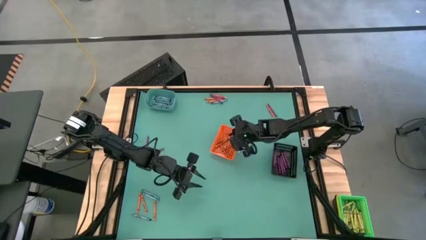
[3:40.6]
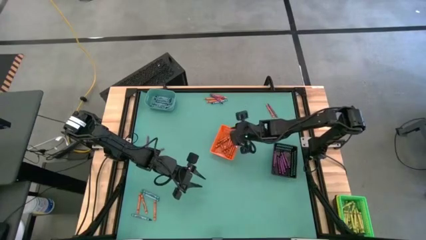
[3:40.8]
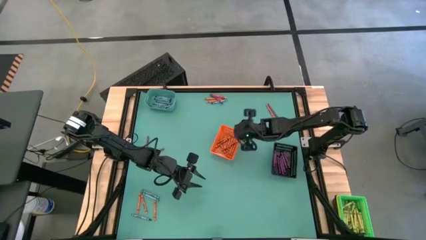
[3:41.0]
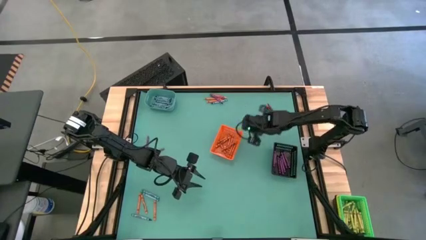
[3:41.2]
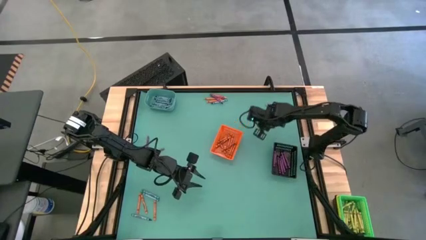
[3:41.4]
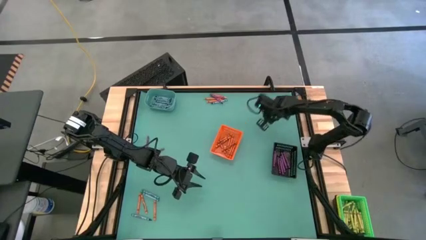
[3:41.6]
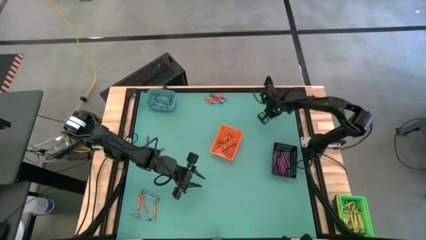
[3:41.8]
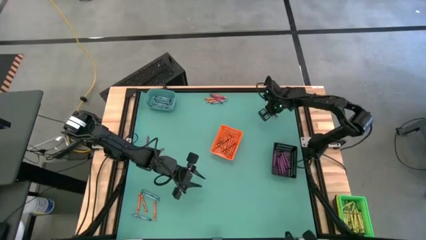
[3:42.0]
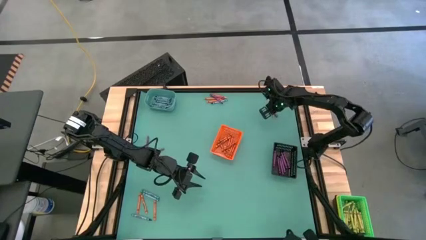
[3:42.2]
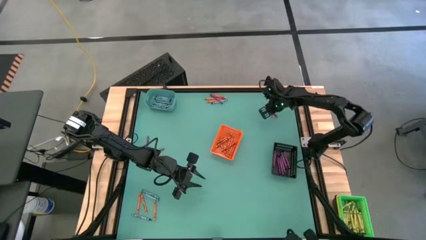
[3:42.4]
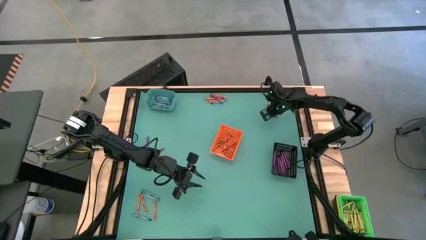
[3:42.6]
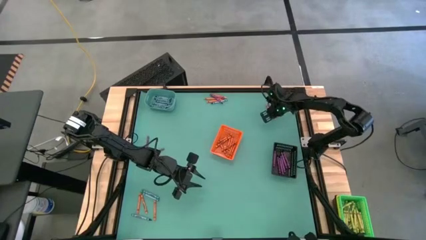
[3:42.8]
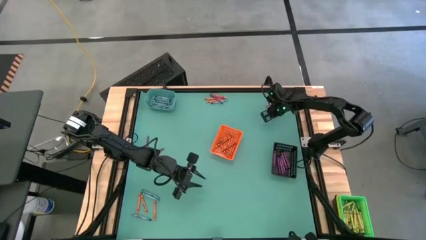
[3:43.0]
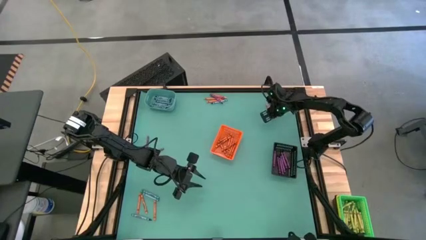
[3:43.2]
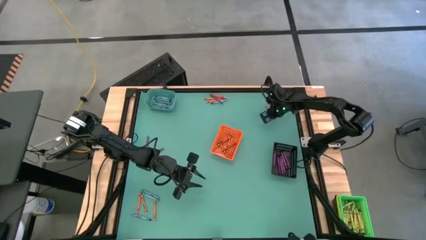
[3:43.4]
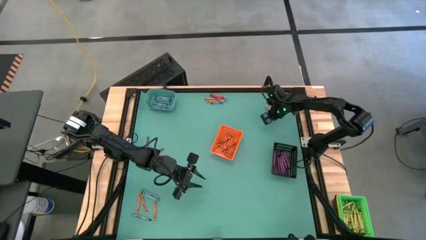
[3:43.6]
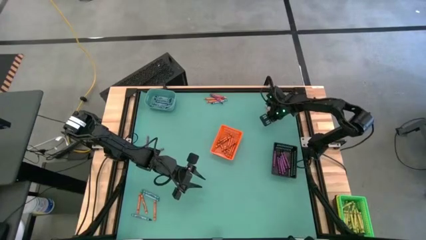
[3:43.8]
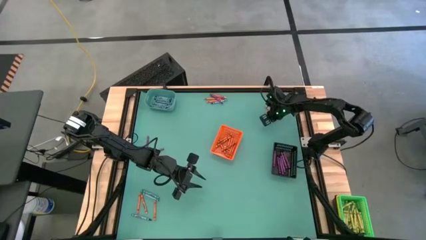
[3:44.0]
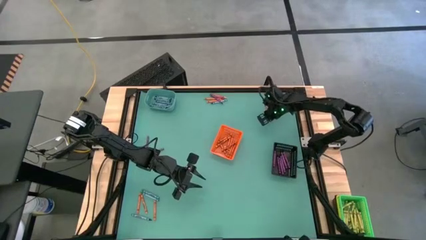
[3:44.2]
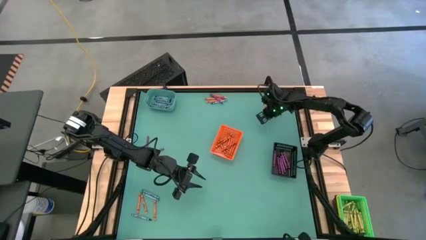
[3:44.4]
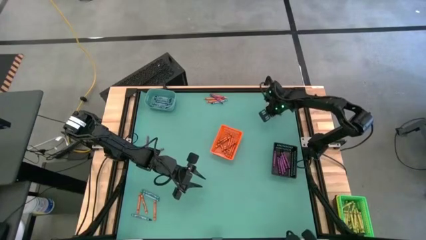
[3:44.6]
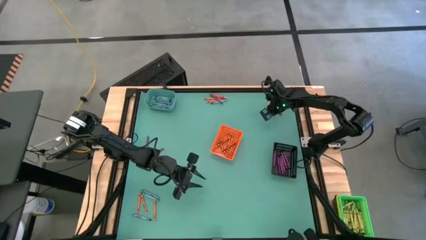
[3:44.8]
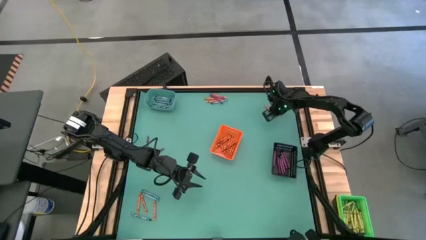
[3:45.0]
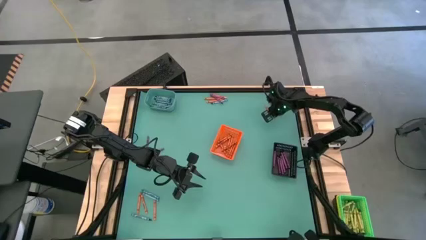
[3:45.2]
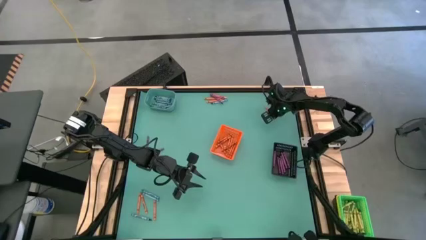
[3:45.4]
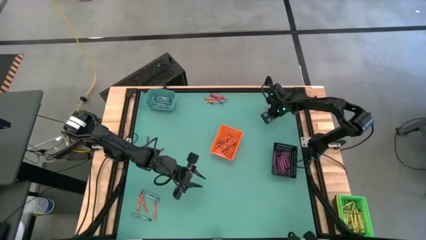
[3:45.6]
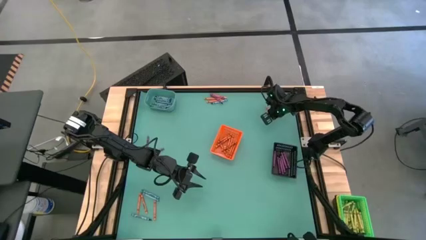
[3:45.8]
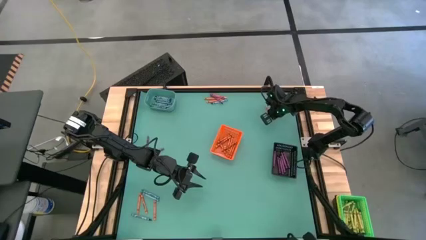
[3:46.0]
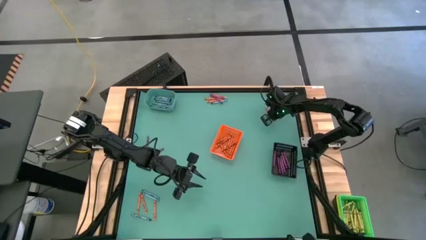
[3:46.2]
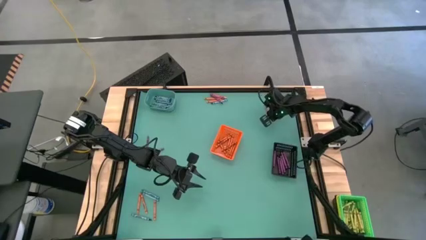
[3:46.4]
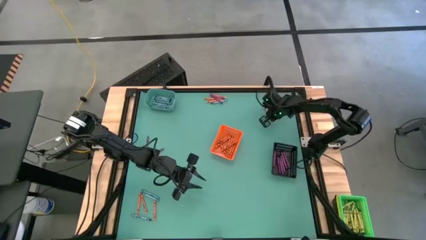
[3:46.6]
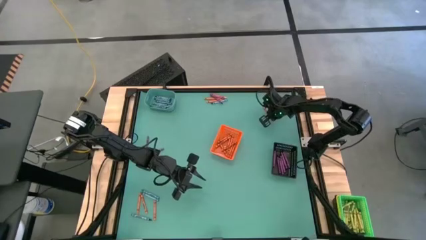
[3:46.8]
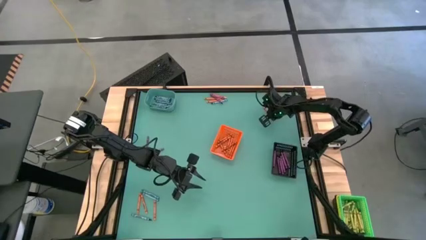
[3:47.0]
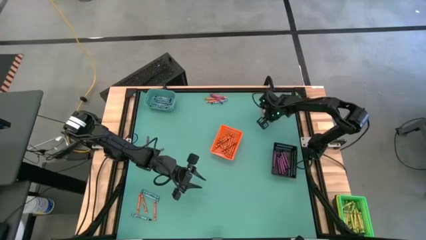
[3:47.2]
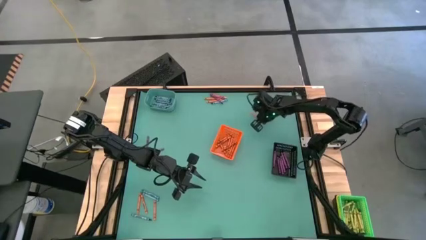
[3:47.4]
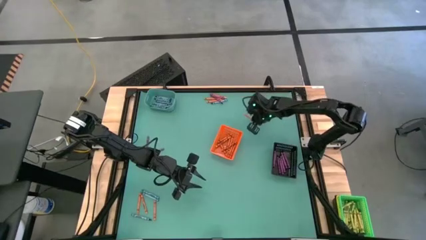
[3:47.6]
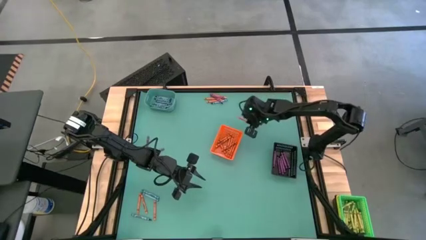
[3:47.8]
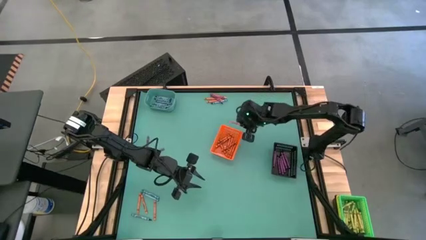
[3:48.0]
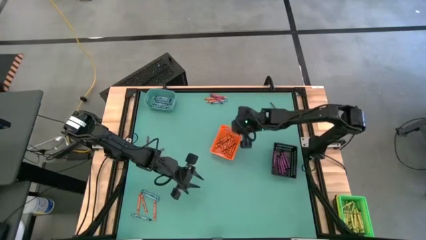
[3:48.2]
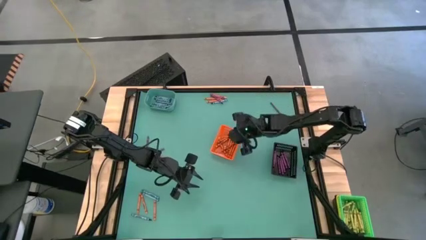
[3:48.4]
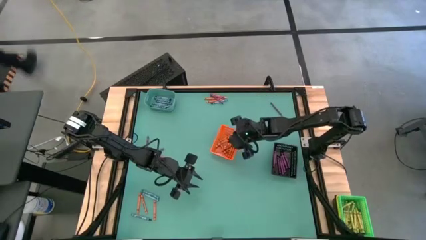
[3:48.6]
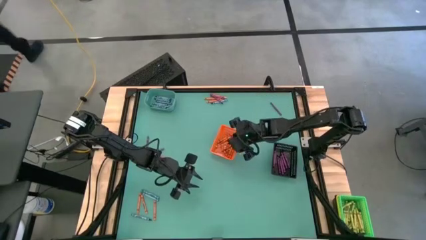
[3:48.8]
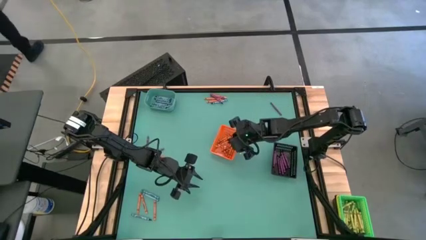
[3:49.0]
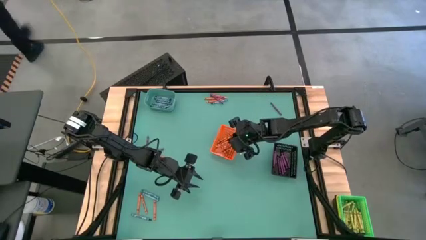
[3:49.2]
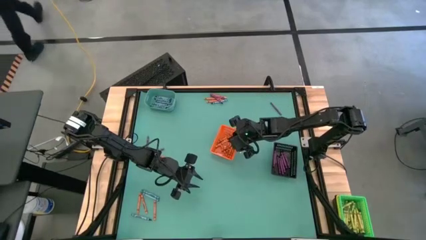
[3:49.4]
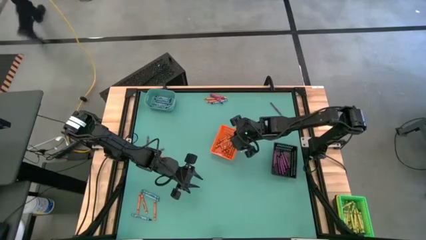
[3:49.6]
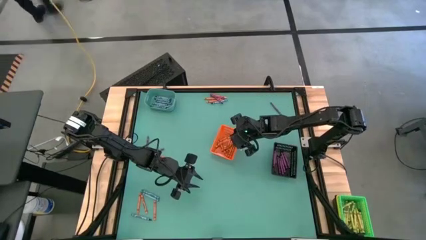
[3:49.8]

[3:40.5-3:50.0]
Task: Sort crayons
Put the orange crayon into the orange bin

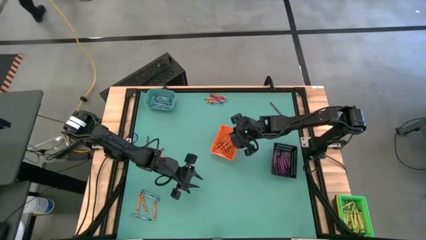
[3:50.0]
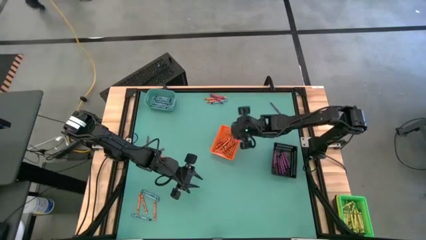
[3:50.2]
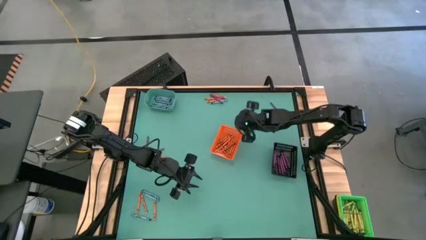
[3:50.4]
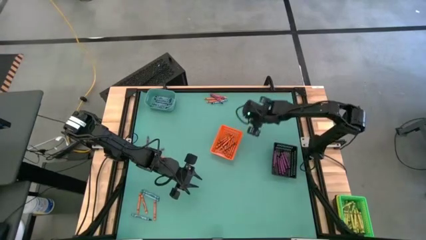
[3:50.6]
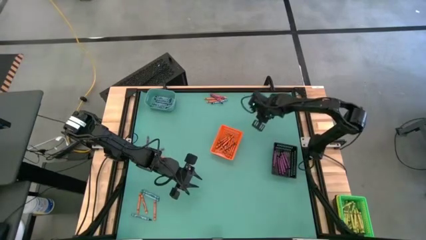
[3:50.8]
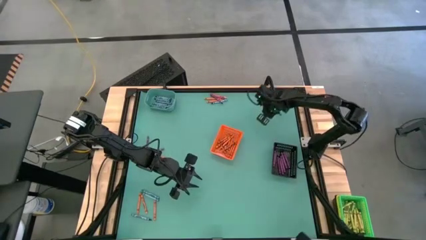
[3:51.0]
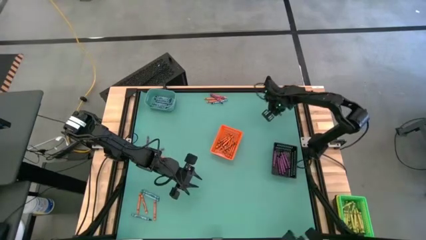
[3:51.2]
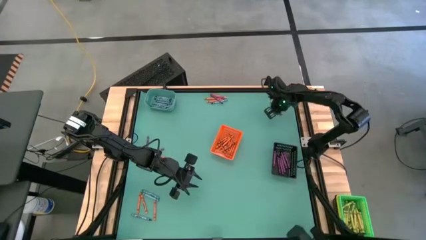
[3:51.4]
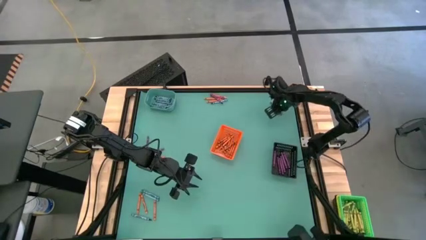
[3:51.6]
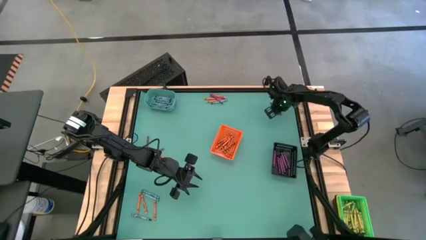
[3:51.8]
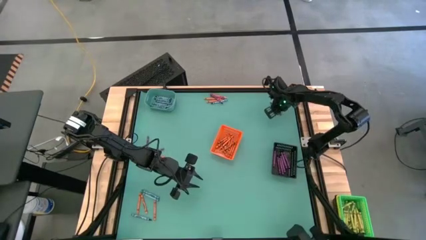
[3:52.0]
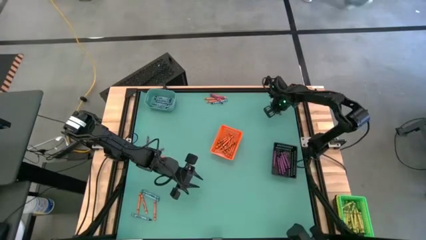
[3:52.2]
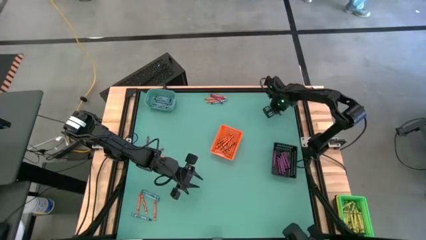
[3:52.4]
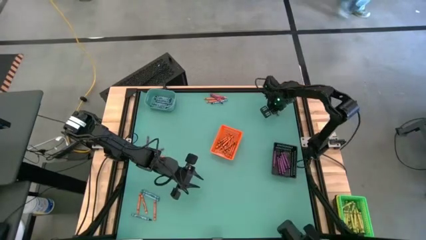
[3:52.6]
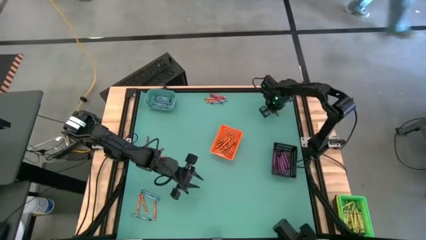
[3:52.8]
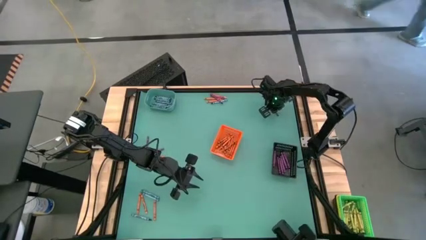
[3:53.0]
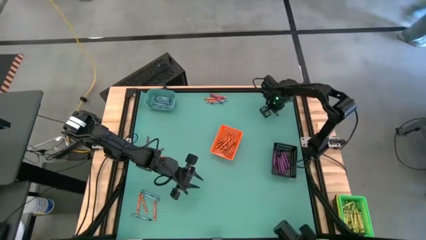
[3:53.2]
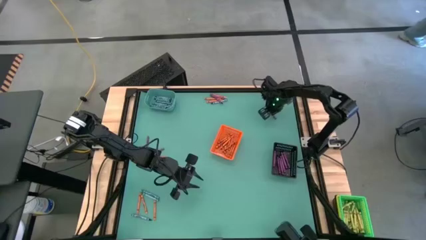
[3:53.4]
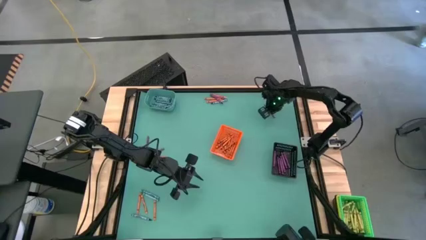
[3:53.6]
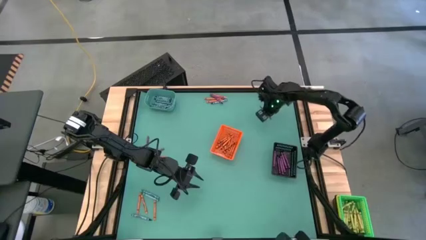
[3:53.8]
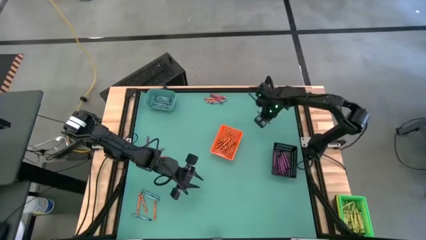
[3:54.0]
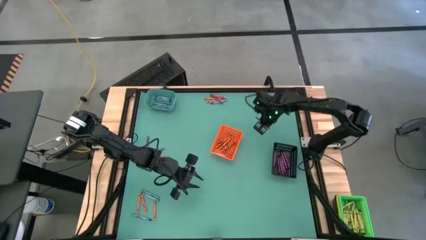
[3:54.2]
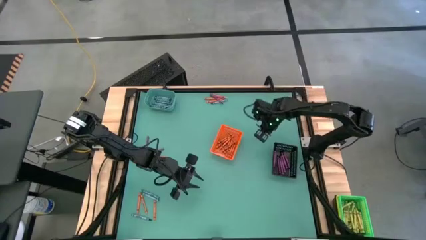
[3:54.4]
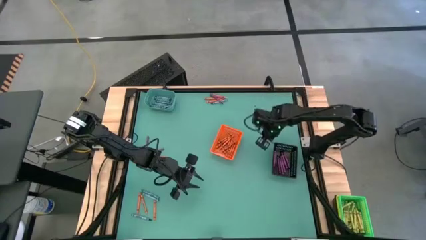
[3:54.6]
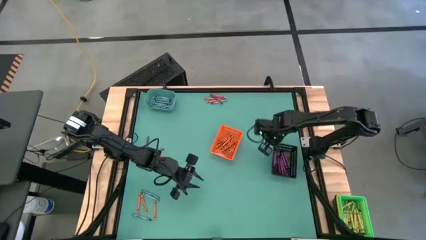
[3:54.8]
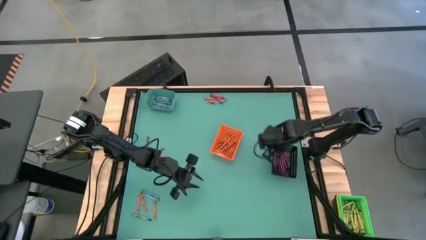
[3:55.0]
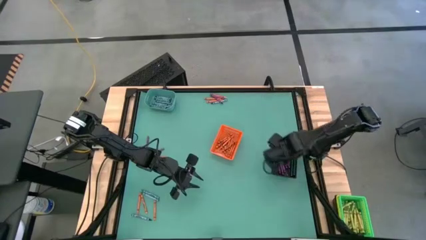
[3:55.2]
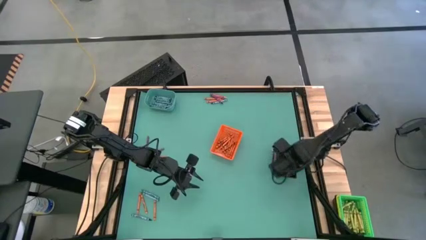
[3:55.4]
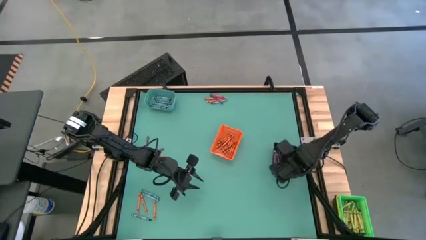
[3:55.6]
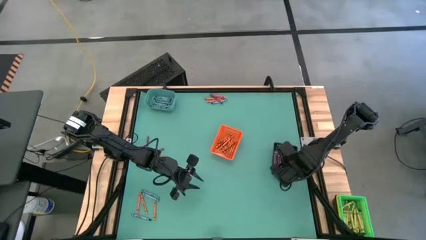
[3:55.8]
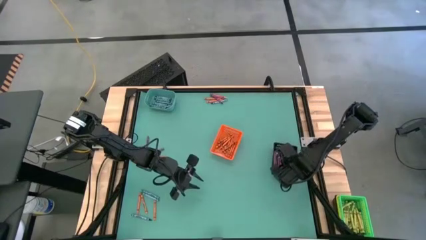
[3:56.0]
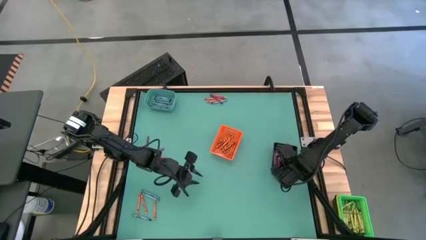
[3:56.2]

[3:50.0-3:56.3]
Put the violet crayon into black bin
